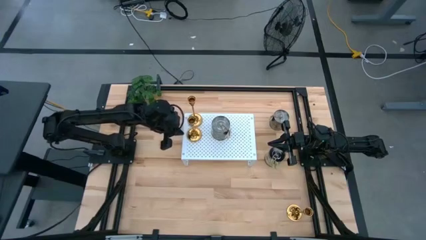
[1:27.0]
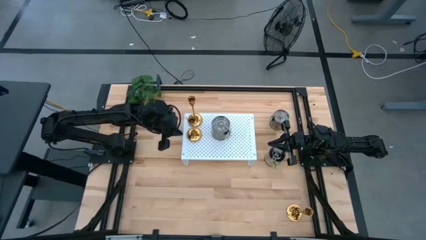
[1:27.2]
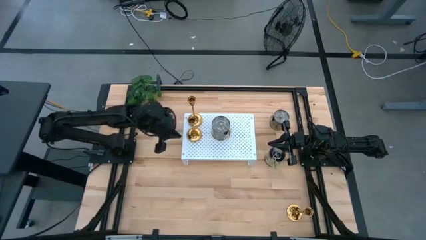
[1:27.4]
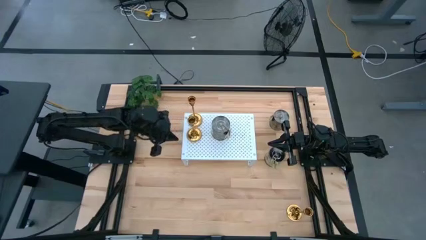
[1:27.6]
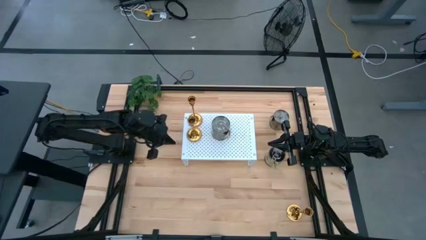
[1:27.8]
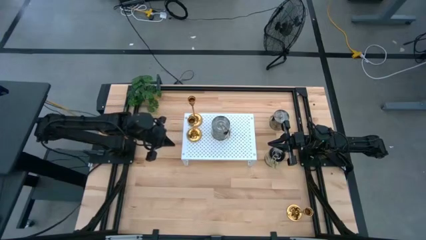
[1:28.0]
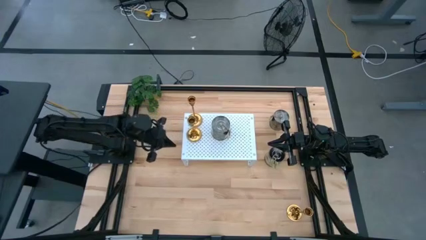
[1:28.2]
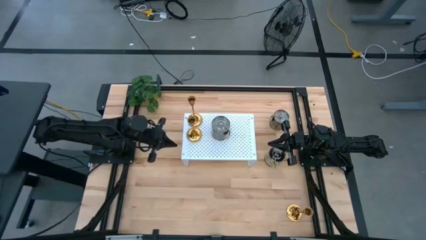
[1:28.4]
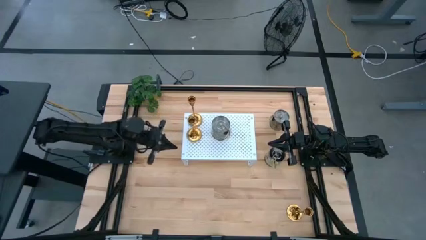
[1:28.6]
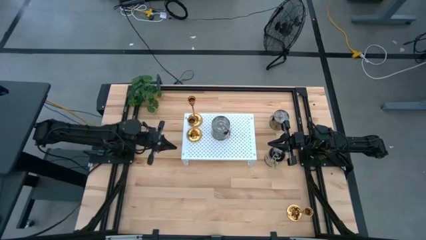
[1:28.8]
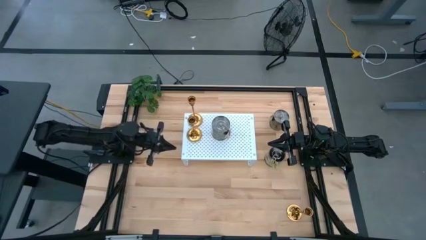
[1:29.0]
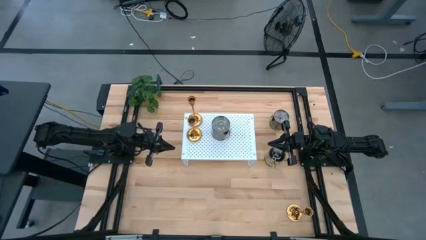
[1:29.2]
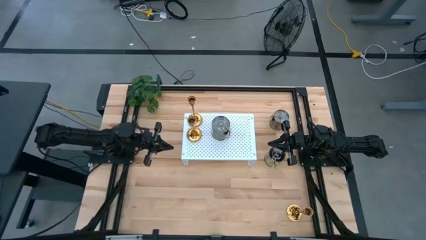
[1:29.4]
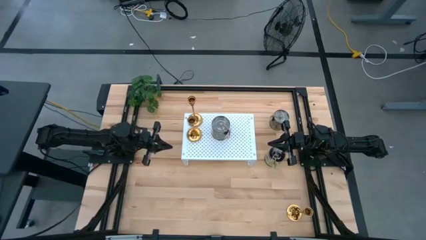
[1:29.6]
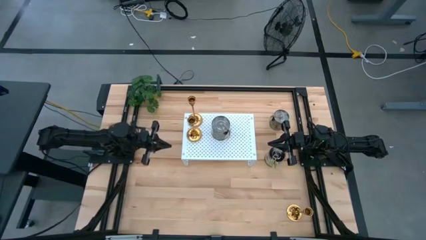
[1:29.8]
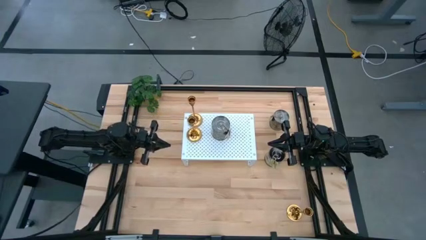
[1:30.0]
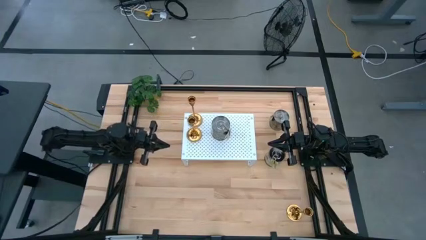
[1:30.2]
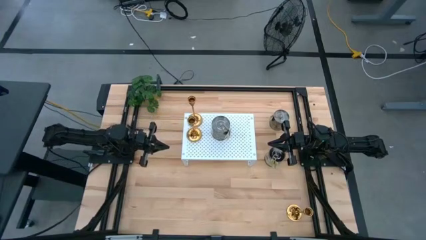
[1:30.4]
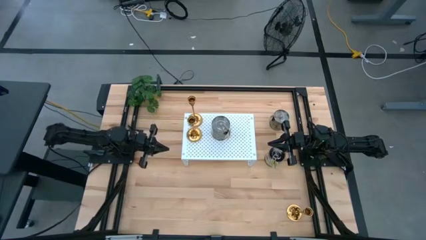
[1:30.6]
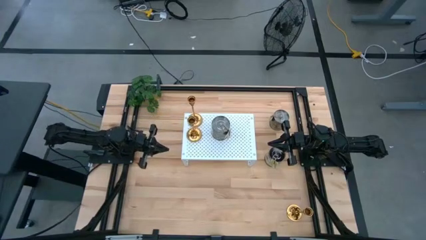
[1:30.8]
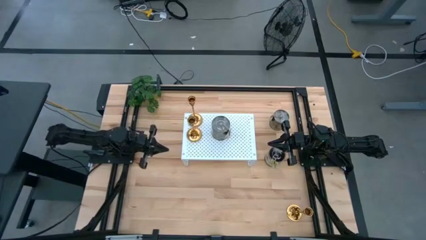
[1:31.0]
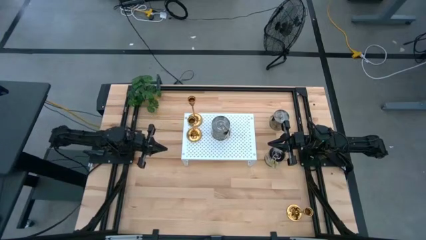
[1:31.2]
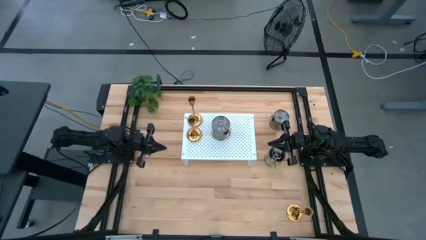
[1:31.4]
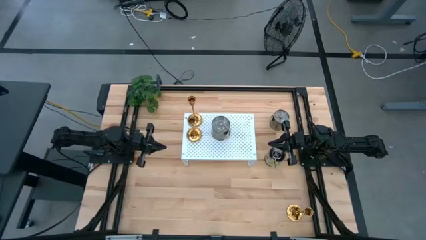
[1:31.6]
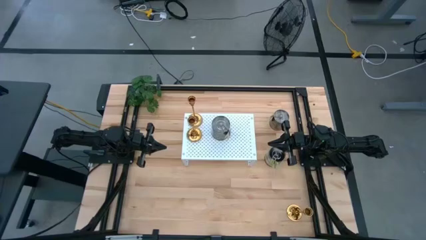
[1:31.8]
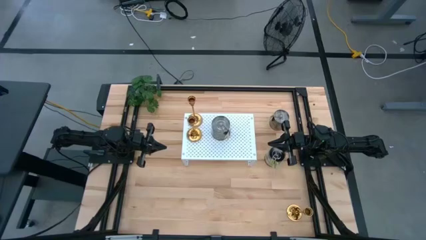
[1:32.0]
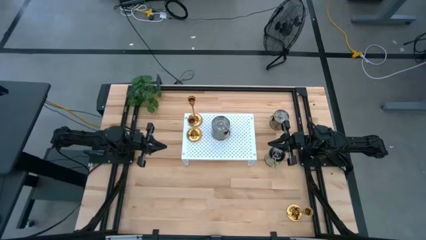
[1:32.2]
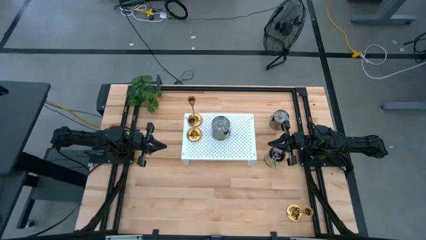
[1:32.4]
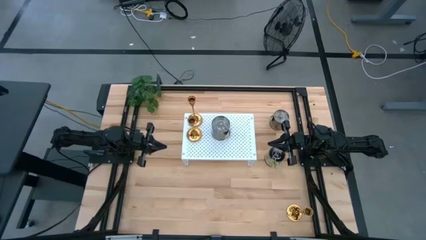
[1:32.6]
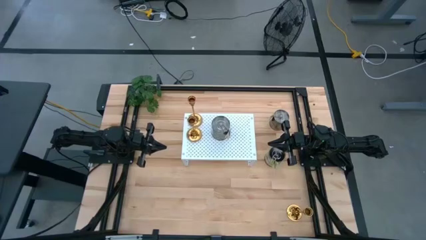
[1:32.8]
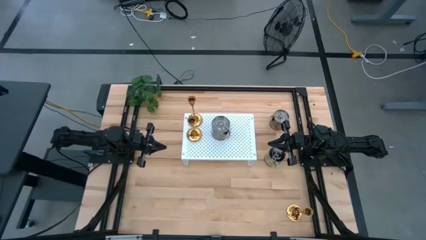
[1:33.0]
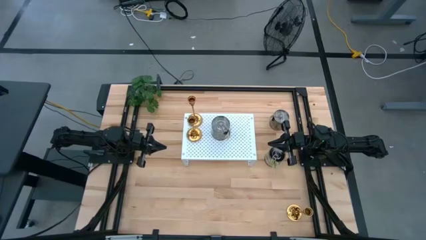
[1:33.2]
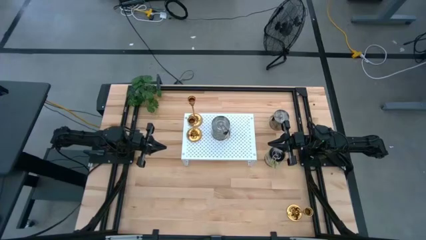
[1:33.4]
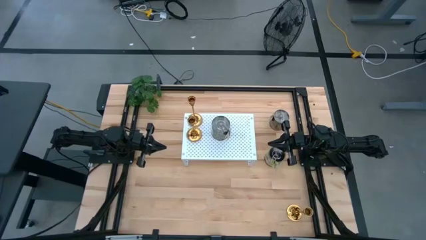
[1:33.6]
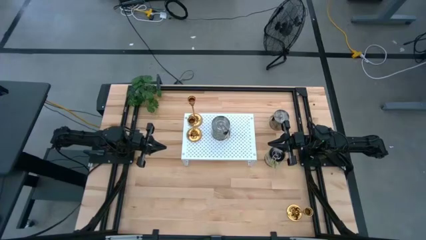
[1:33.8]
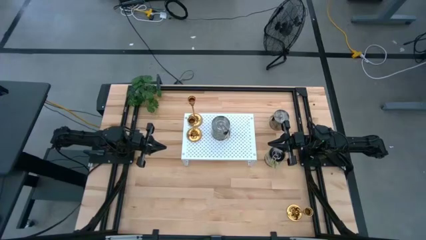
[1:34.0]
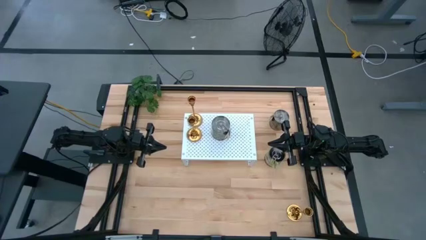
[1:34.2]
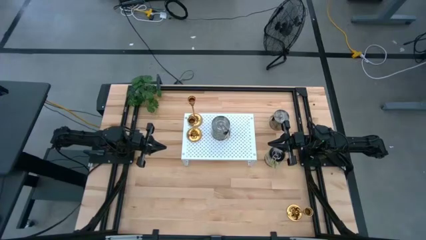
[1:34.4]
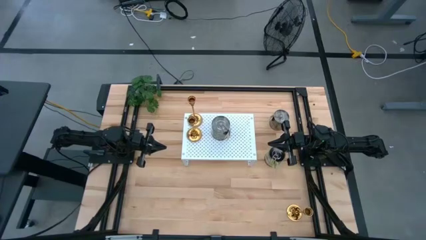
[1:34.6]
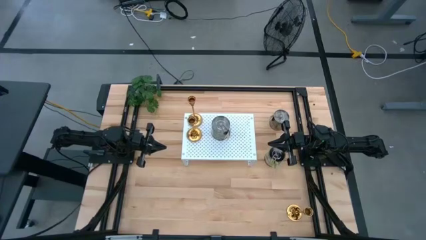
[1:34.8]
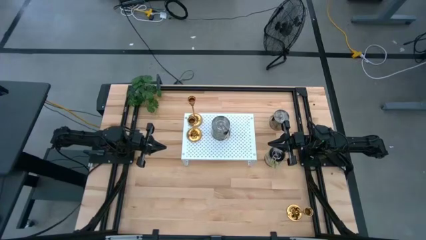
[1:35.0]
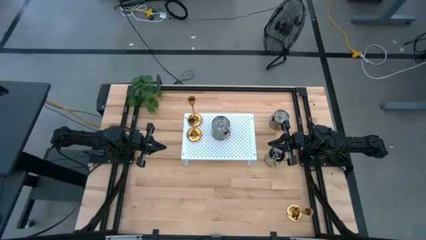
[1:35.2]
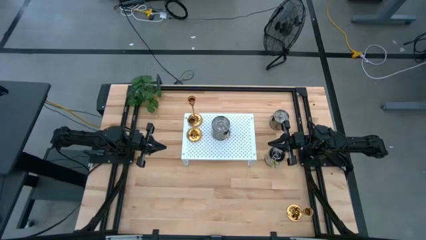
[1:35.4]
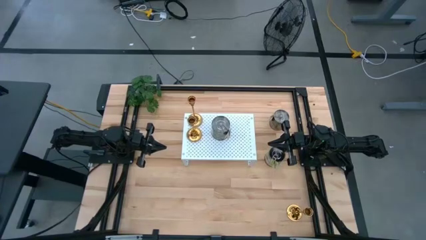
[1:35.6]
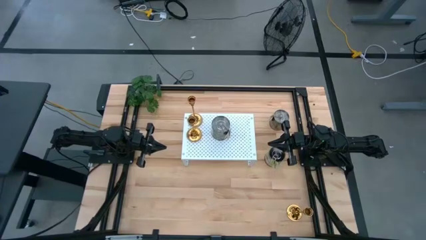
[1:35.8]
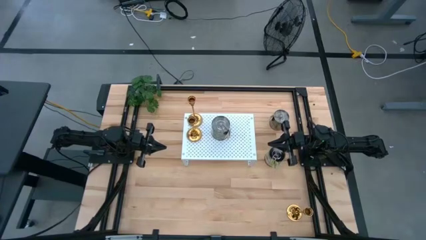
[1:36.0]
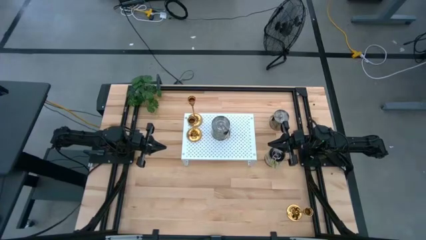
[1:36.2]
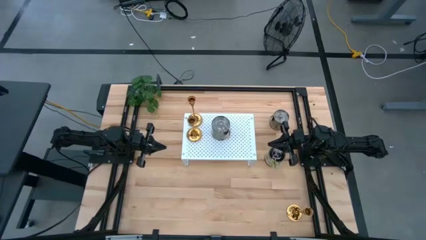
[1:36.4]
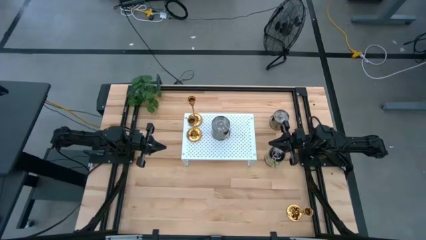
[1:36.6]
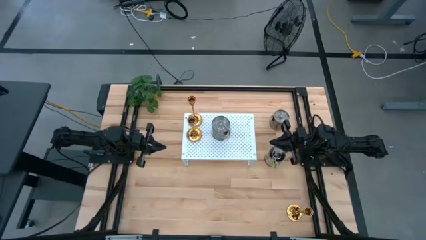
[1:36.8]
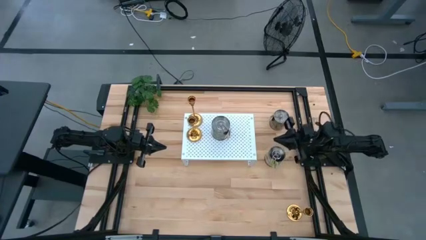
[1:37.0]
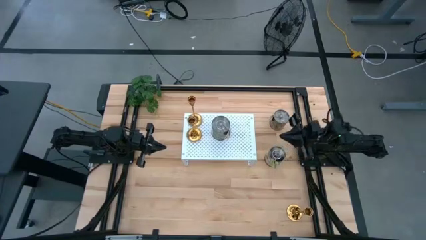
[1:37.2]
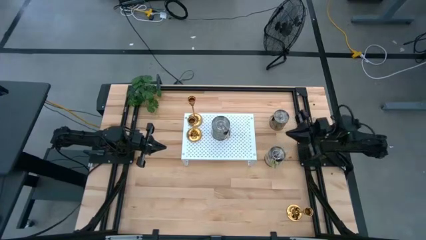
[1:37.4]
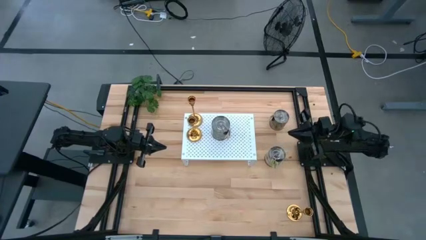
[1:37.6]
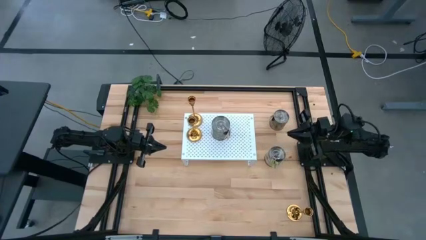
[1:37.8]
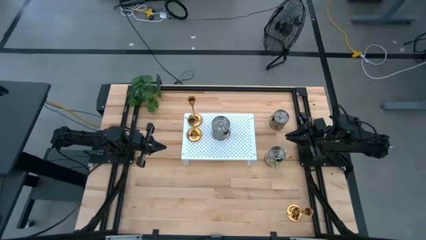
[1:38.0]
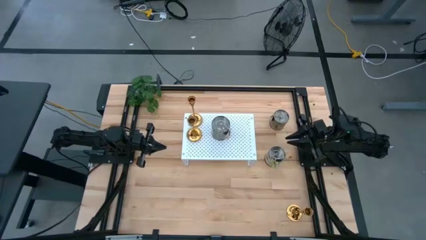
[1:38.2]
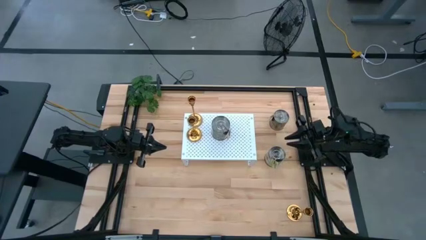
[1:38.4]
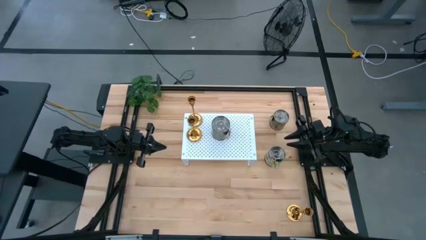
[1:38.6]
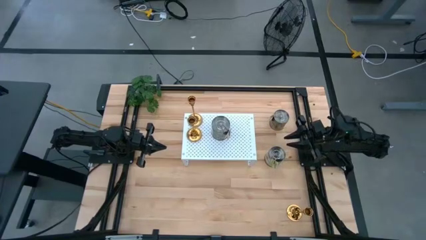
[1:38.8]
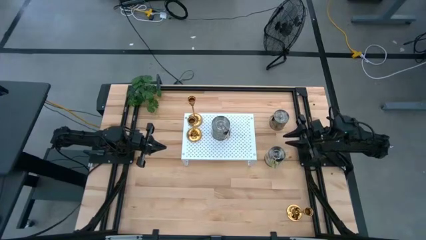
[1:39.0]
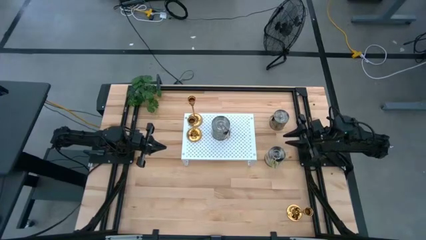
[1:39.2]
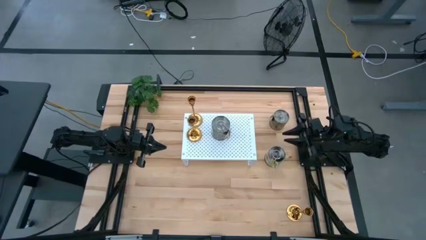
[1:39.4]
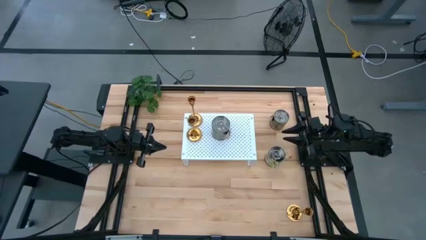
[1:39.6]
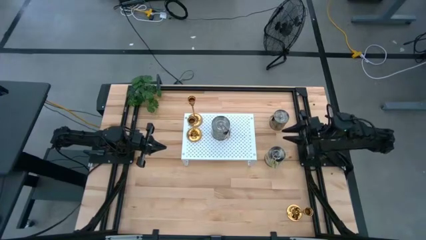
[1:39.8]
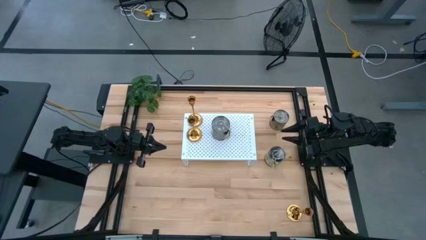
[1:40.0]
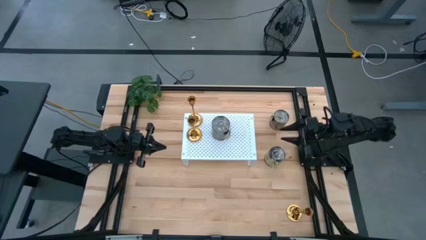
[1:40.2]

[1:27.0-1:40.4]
Task: Pick & Place candle stick holders
Put the golden candle holder on the shelf

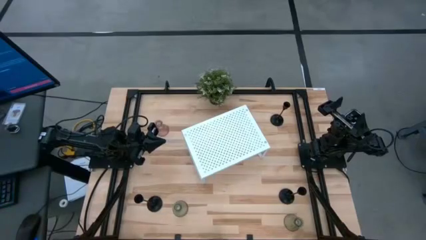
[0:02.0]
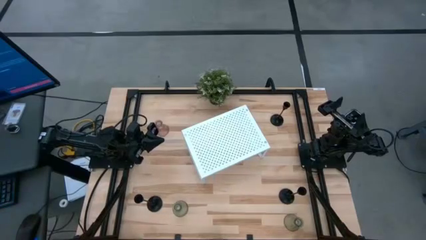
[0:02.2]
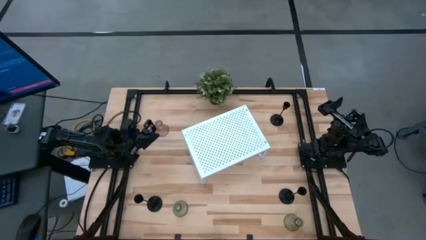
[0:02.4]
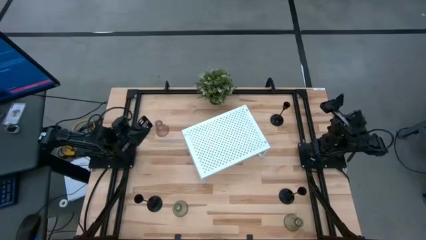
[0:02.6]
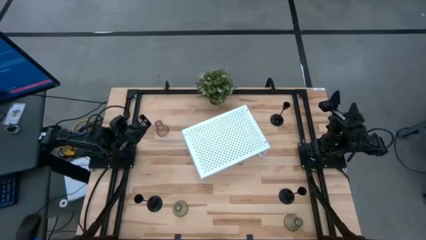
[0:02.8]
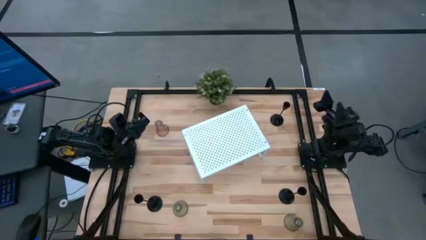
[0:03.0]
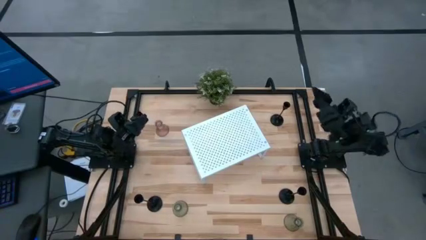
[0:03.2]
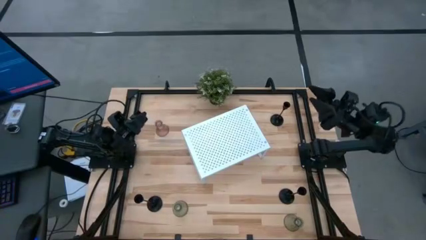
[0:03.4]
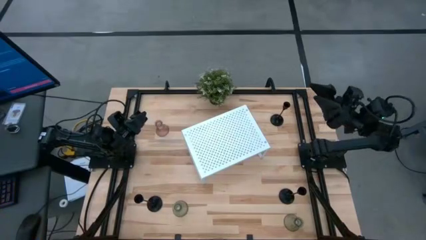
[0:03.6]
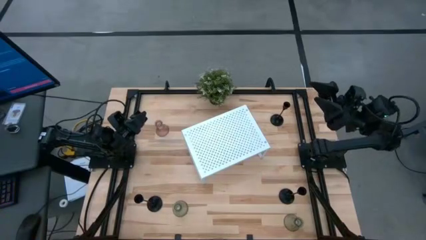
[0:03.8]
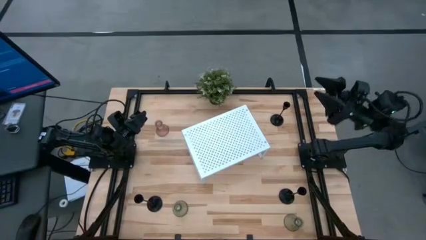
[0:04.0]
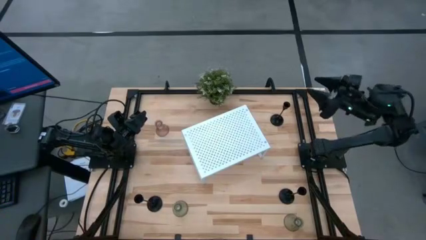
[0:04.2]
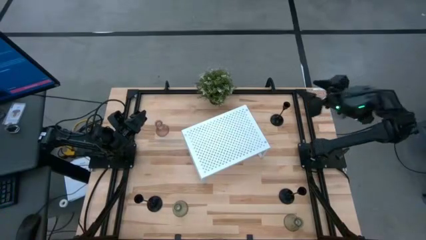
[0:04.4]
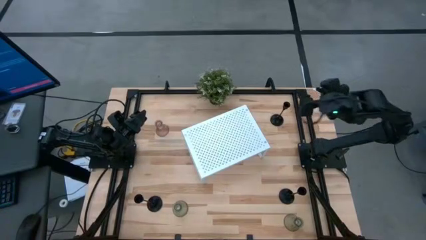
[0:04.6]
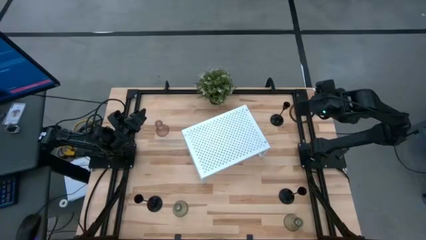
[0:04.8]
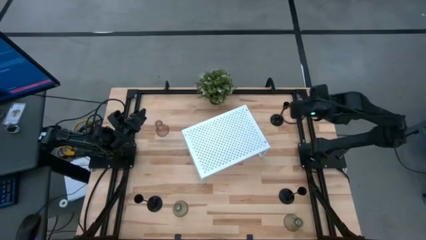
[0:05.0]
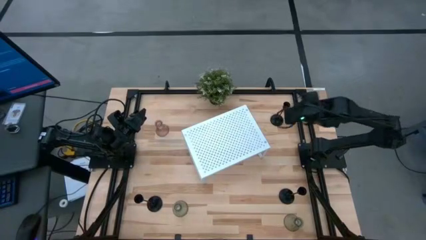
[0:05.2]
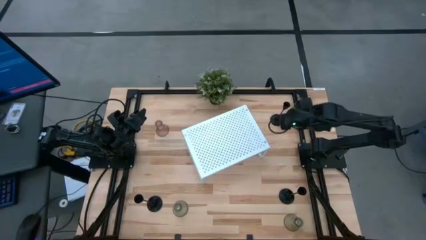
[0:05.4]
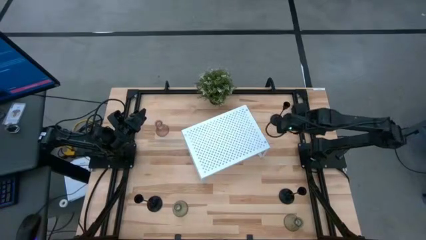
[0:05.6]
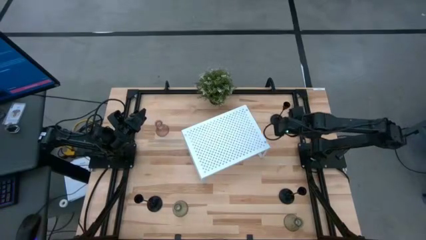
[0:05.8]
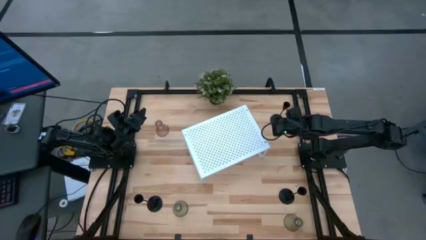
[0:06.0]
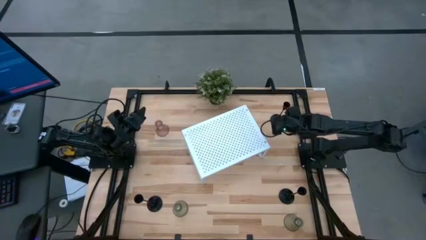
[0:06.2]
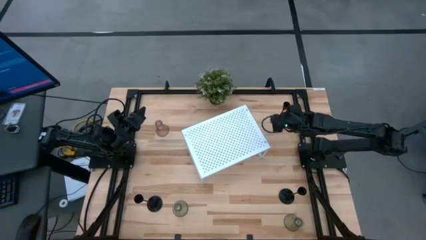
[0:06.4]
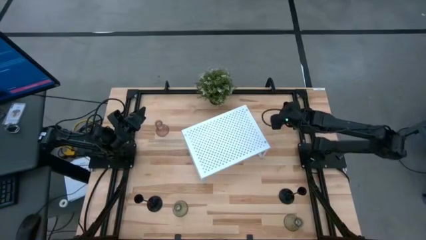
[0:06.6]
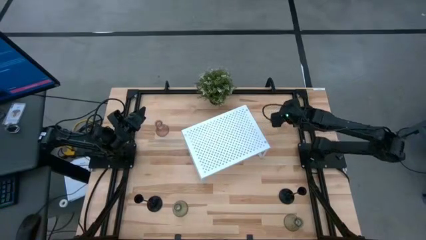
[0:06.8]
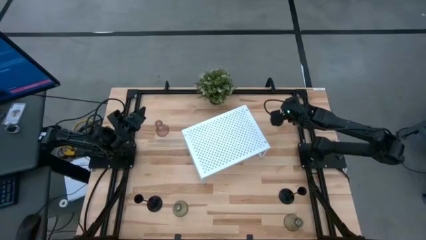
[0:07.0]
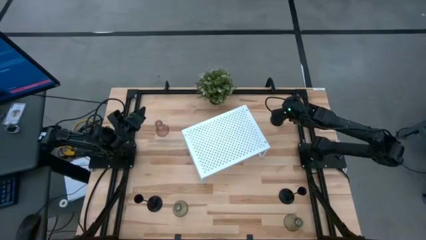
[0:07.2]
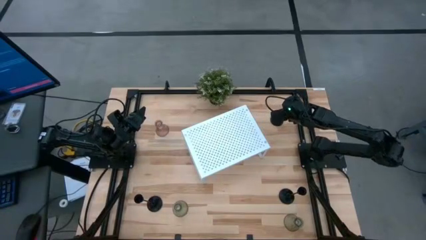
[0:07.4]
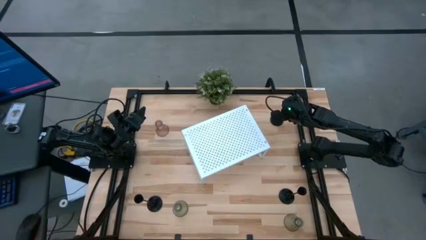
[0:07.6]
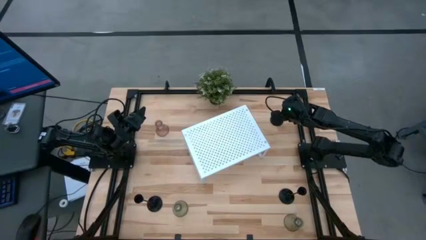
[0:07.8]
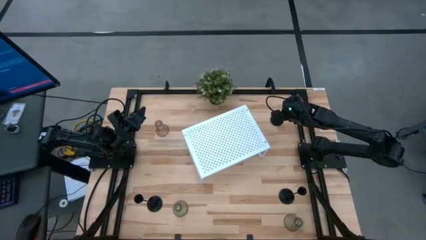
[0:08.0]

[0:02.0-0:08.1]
Task: Pick & Place candle stick holders
Put the top right black candle holder onto the shelf
